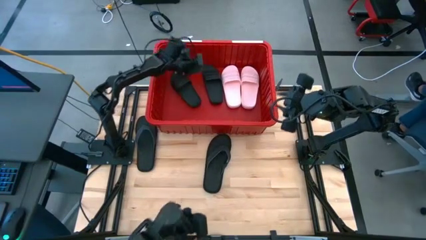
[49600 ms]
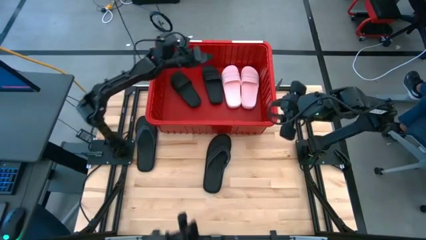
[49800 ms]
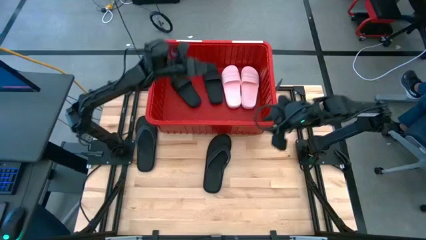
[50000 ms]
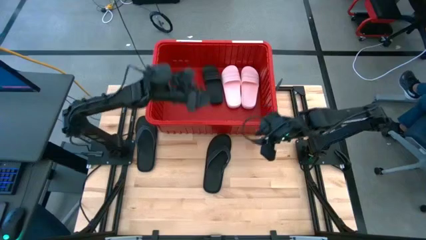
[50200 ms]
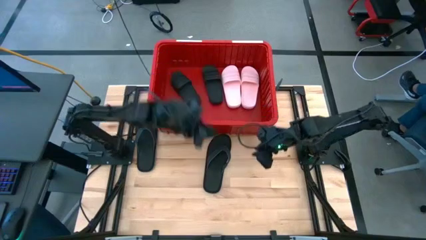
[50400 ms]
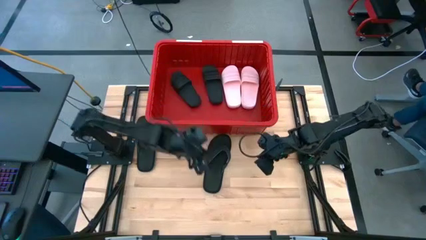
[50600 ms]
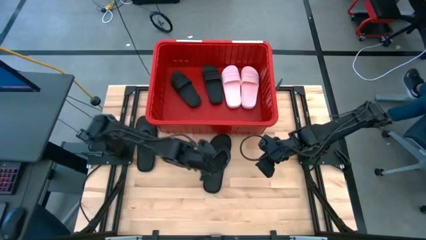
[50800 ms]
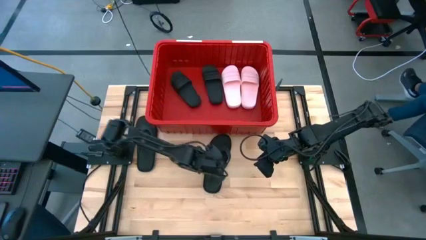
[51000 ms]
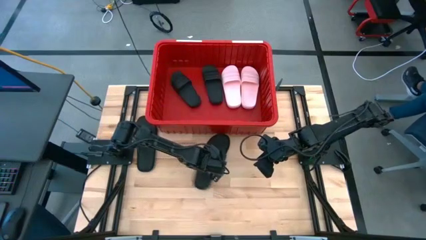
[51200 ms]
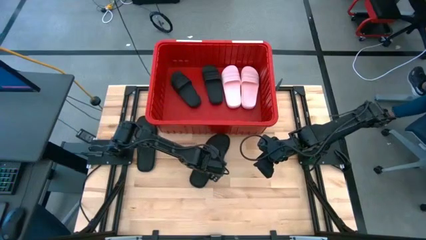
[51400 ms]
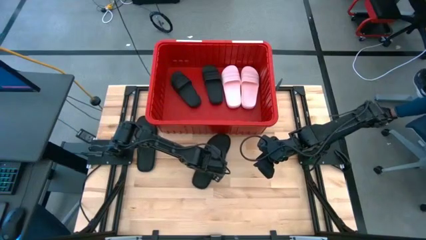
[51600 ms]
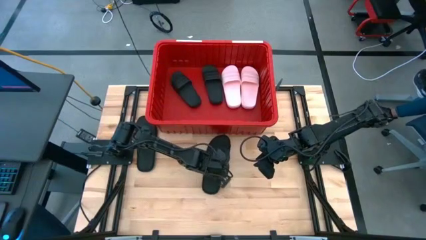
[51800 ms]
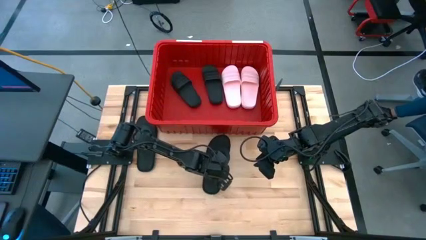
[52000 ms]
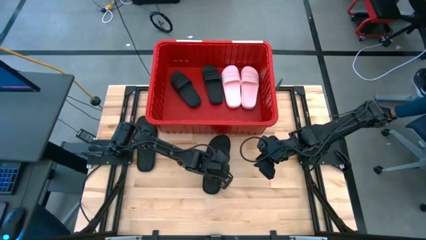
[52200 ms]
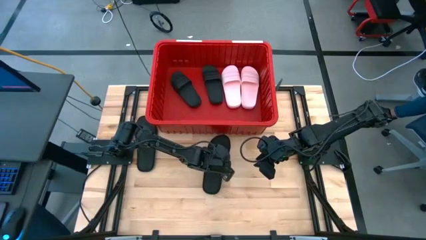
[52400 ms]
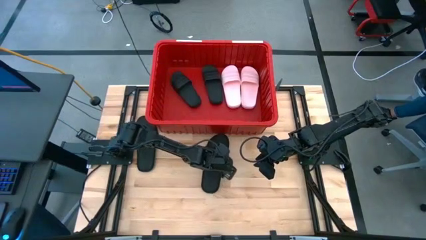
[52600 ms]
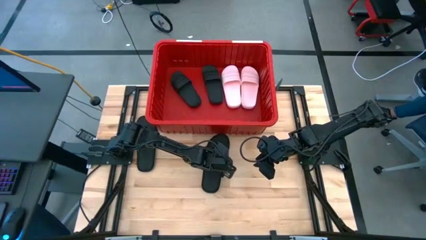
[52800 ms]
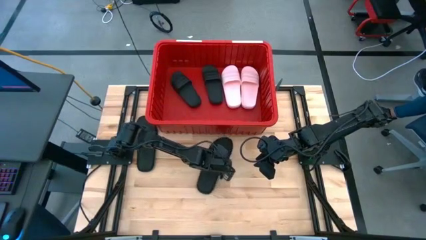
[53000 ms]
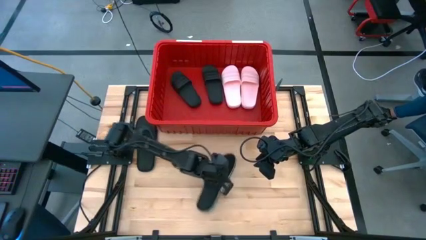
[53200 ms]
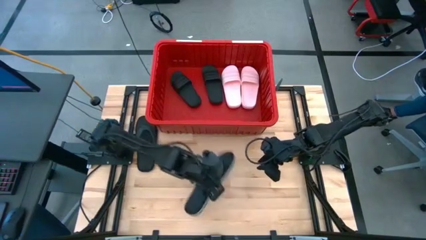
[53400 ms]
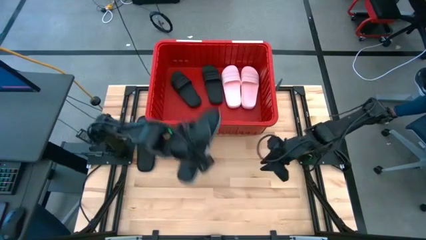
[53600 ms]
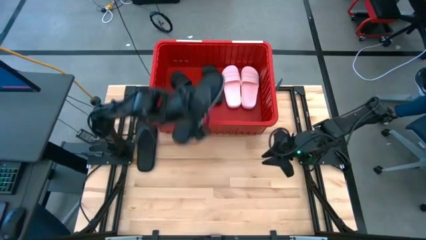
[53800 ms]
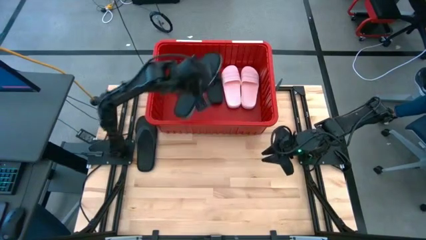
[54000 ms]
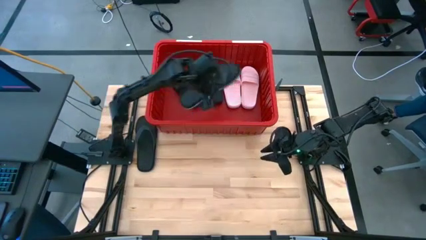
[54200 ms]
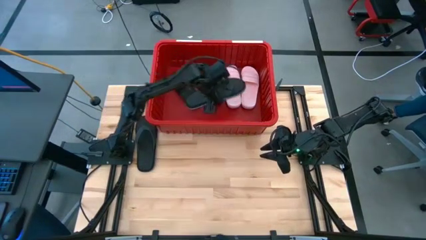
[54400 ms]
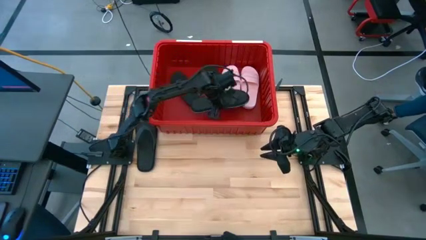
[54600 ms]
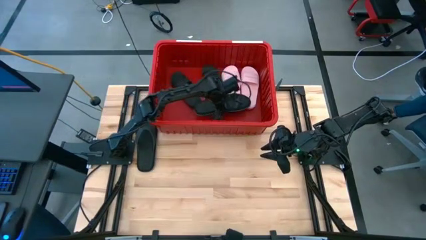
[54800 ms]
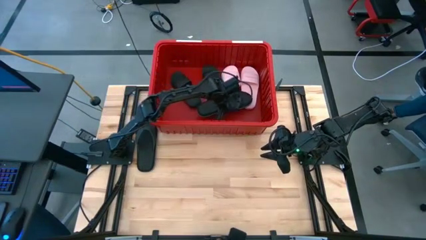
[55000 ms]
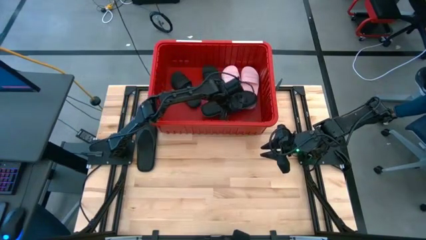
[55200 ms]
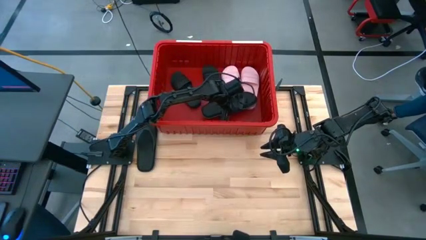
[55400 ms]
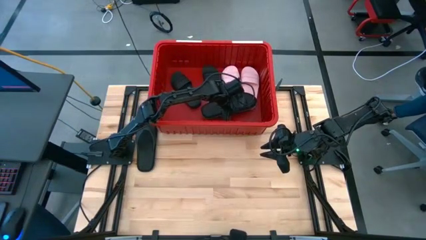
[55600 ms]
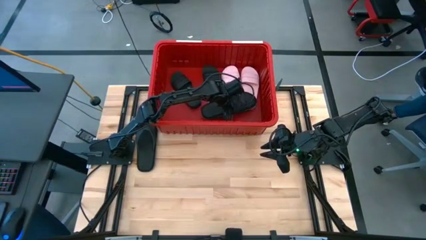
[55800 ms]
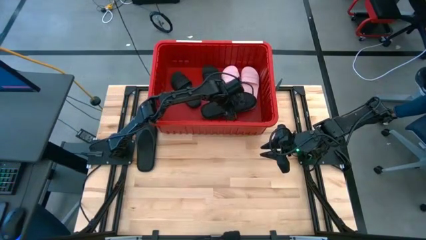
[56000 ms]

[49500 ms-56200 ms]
Task: Pick and place slides into bin
Put the right black slipper into the red bin

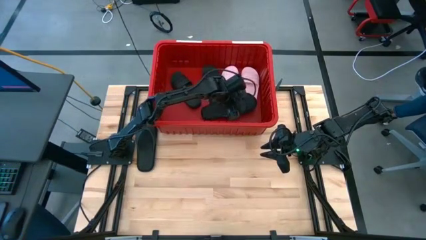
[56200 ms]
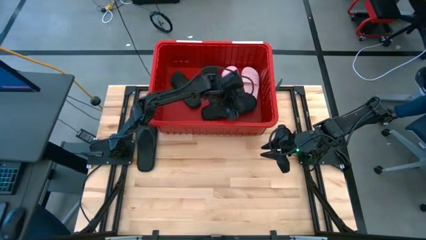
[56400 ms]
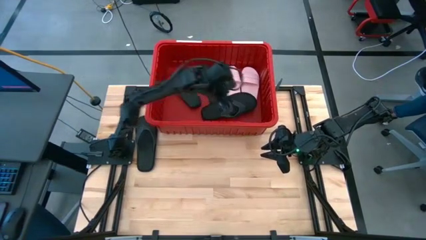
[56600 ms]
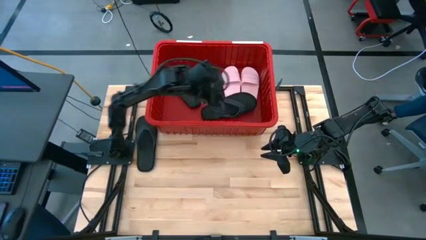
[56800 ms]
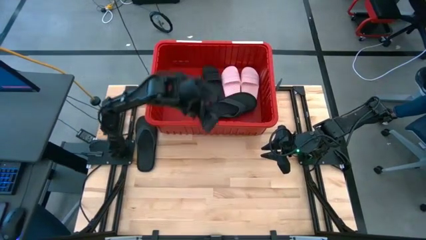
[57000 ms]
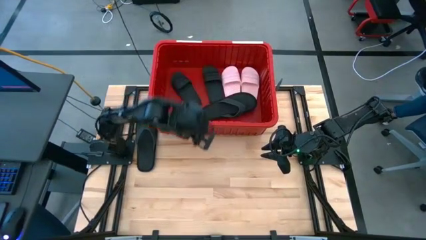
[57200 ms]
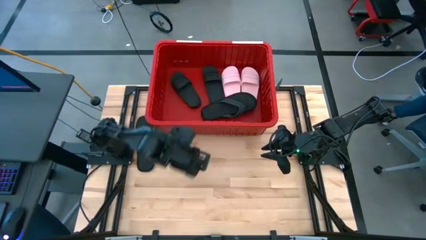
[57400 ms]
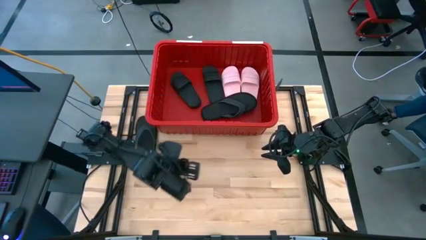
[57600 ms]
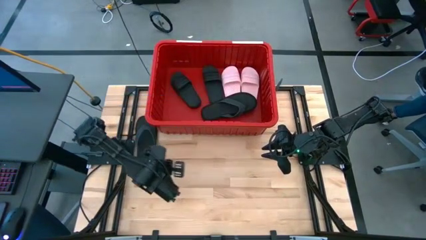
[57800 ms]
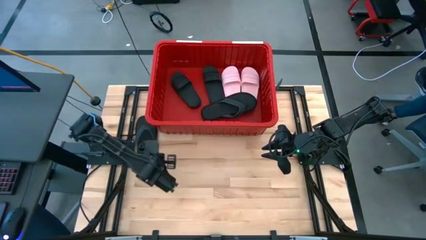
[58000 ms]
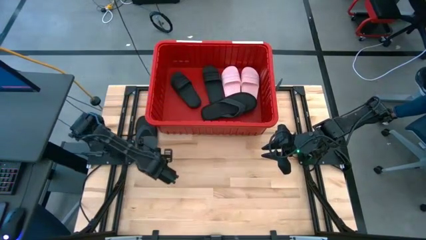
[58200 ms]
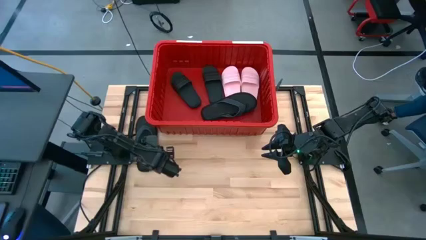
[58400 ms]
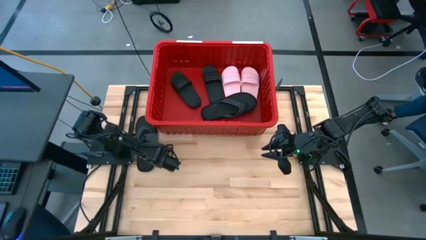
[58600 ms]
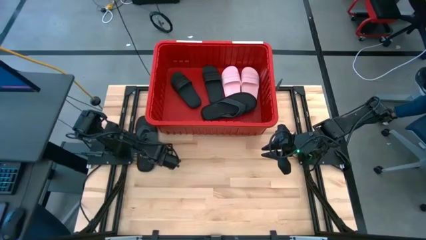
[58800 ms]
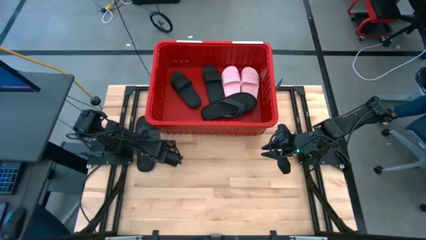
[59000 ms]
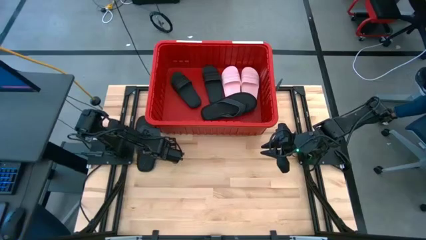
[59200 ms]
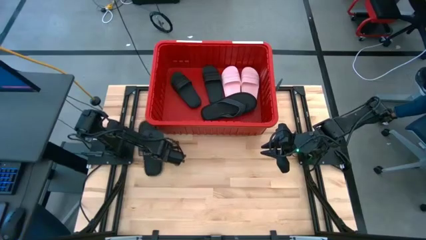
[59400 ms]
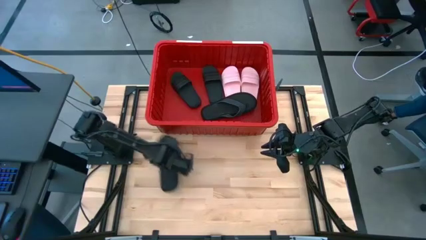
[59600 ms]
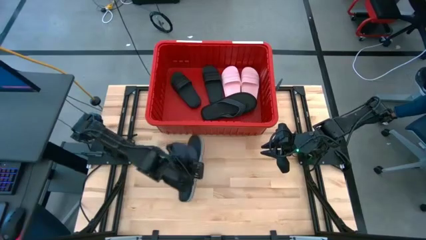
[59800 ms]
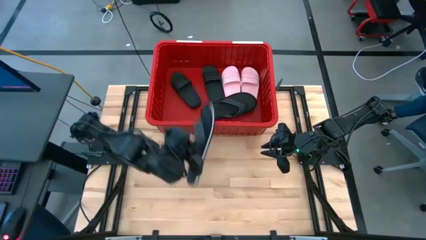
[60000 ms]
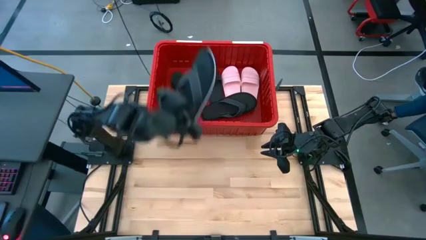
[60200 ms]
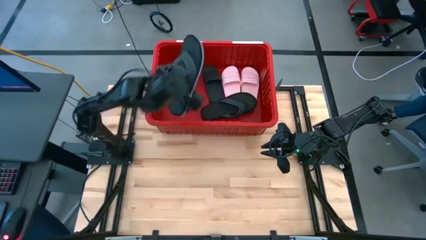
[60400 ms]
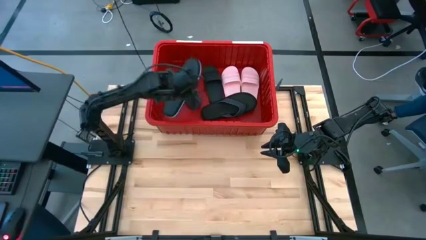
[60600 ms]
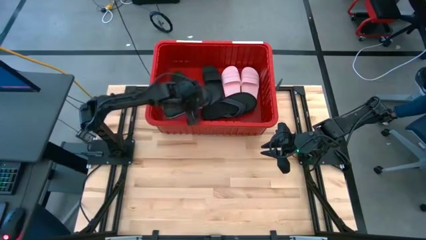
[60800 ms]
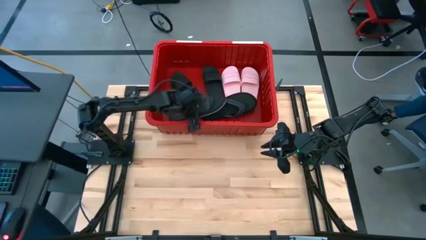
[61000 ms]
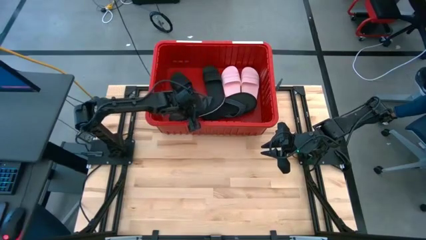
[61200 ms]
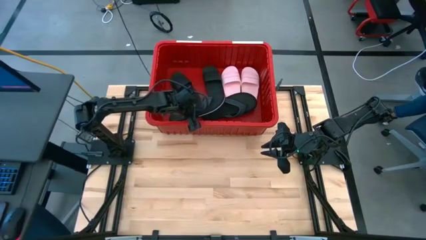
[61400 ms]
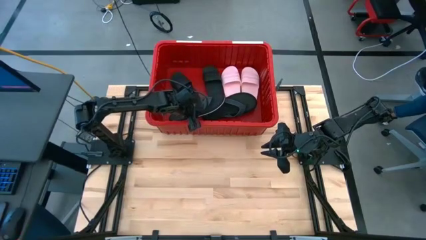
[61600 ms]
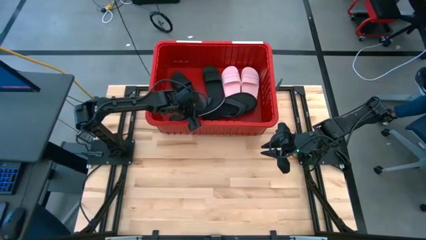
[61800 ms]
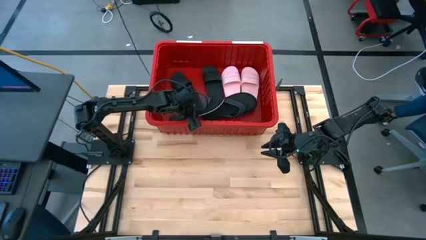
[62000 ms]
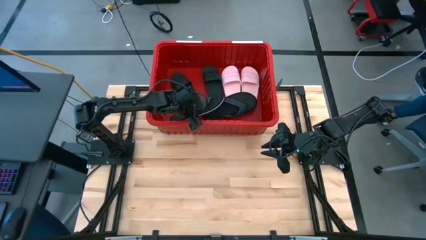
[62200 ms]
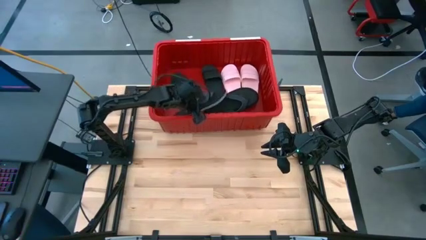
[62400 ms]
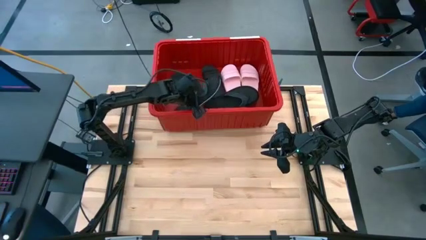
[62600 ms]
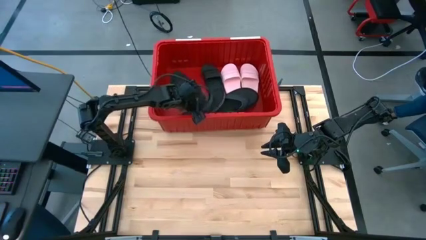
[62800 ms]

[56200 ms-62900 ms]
Put the black slipper into the red bin

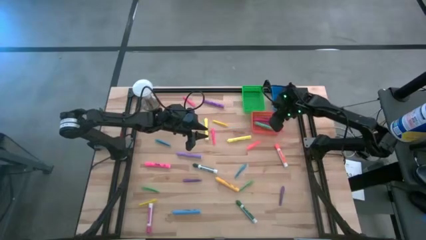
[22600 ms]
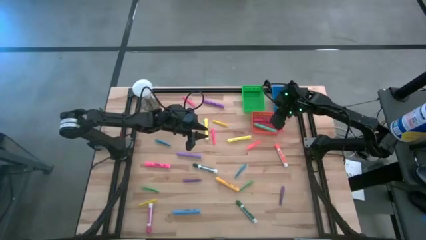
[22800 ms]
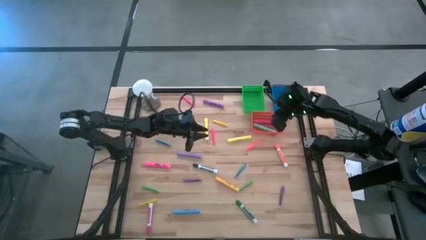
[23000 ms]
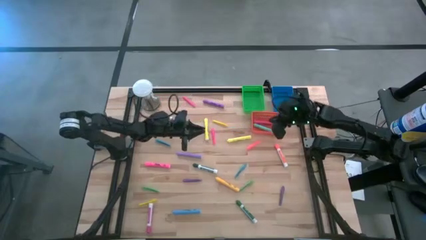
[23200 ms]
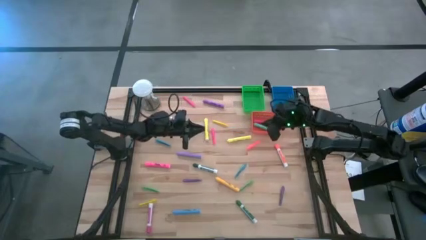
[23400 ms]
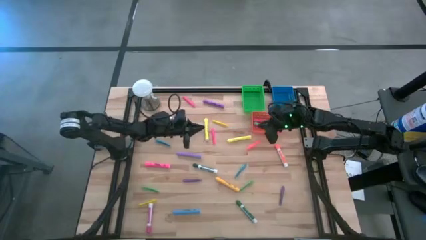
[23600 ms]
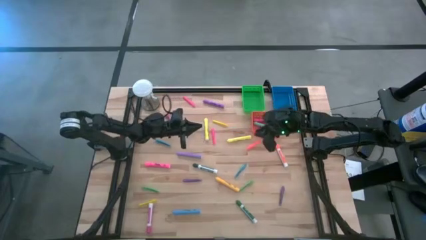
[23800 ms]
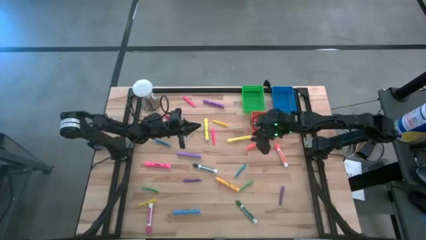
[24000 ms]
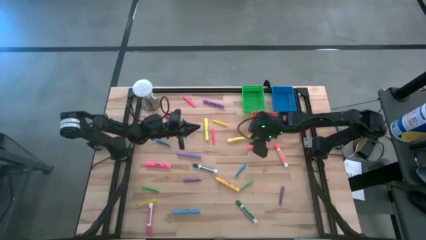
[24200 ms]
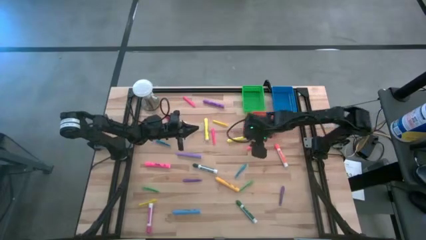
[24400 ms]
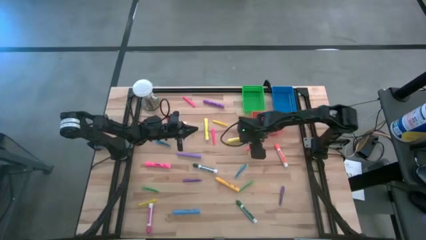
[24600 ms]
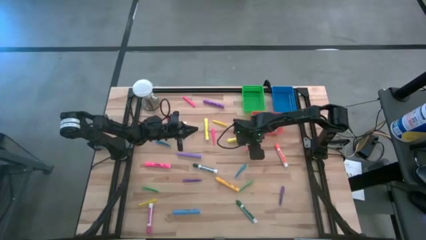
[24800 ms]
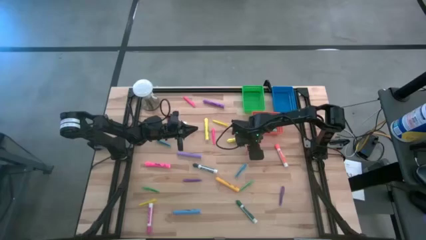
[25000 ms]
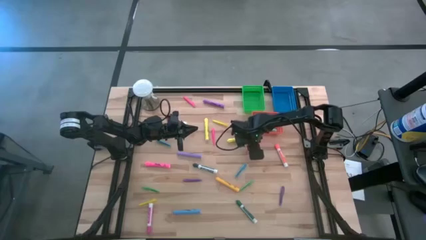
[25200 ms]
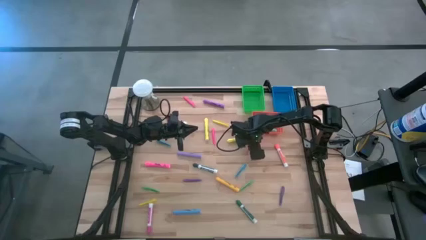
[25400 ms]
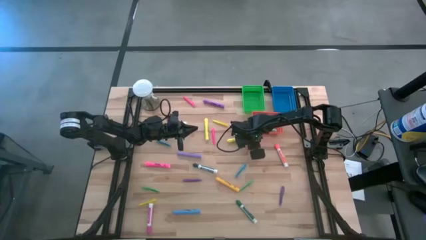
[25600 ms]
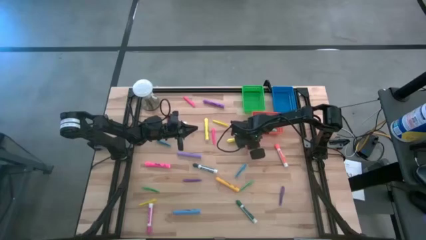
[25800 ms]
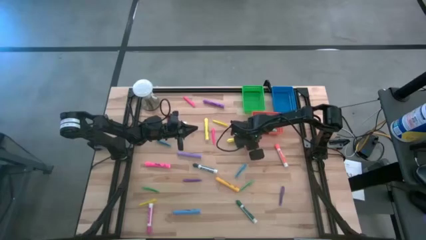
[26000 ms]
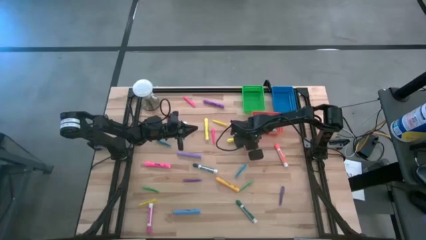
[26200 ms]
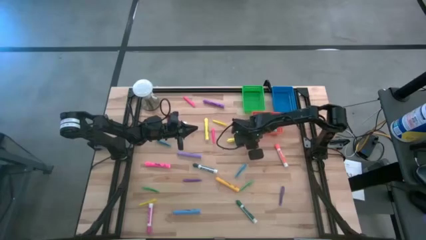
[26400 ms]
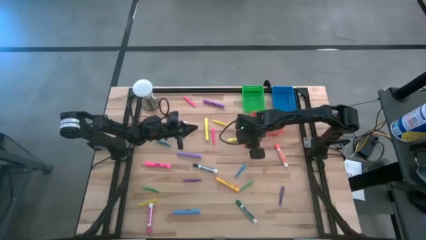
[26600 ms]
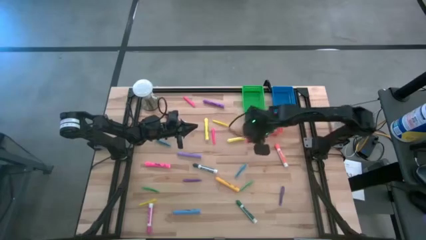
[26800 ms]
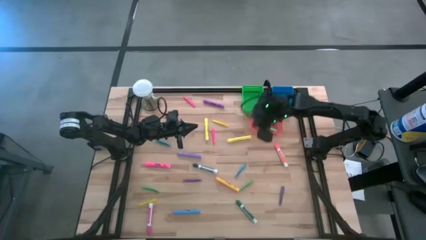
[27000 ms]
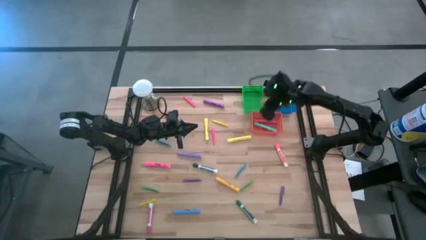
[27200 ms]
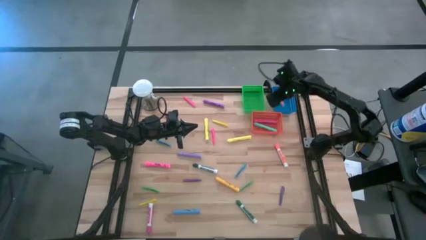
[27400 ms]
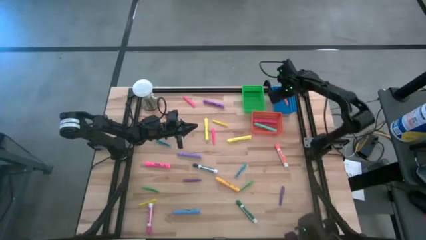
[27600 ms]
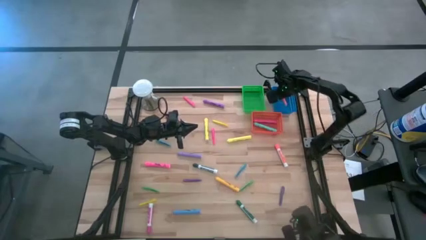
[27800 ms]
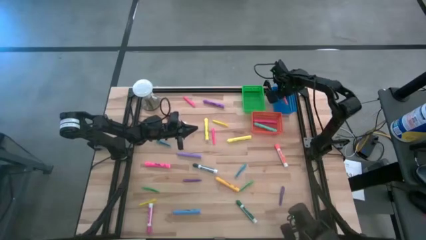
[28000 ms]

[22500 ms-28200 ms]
Task: Pick & Place Markers
Put the orange pen into the blue bin
